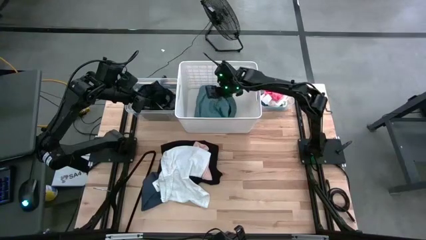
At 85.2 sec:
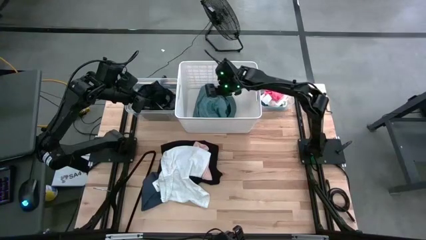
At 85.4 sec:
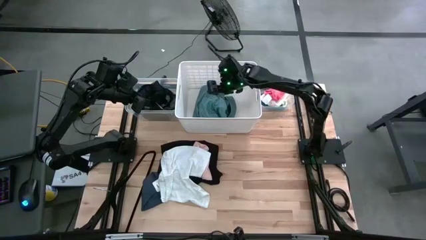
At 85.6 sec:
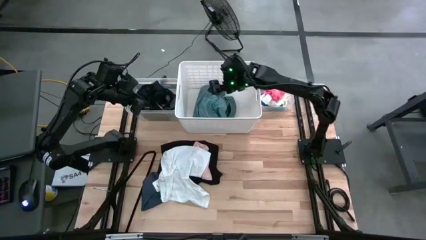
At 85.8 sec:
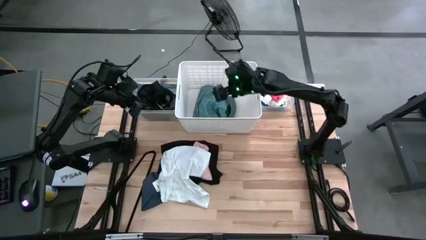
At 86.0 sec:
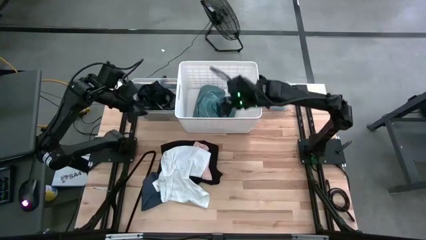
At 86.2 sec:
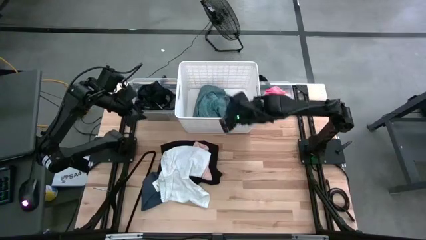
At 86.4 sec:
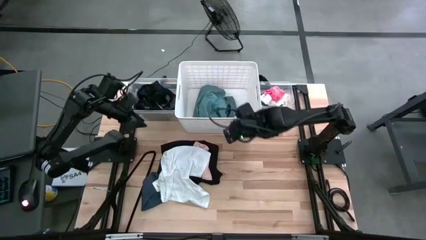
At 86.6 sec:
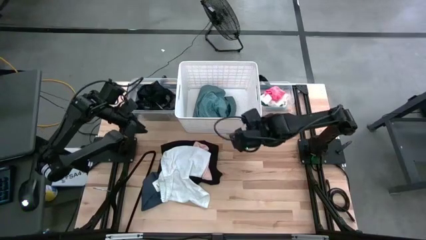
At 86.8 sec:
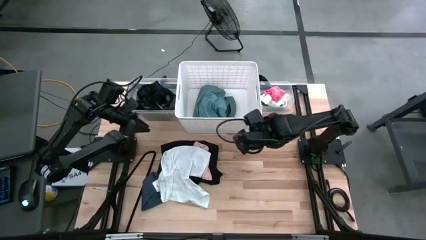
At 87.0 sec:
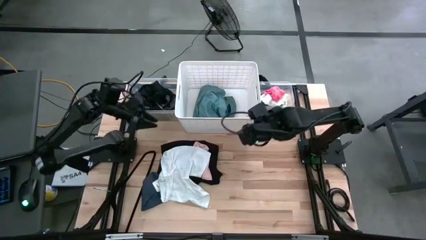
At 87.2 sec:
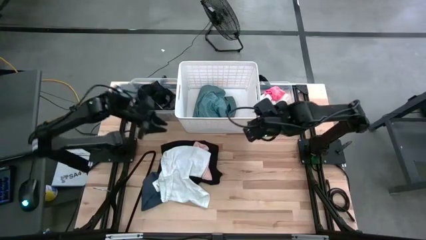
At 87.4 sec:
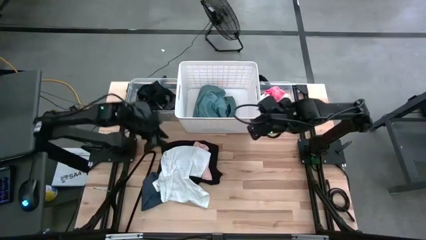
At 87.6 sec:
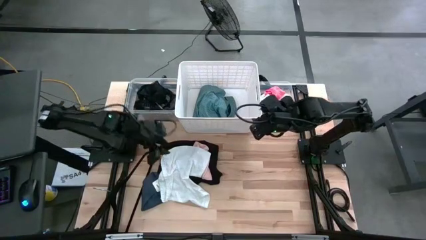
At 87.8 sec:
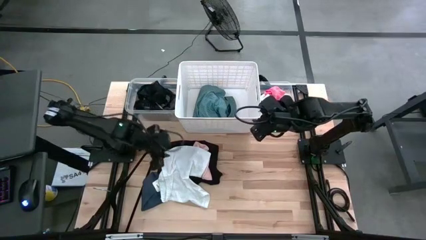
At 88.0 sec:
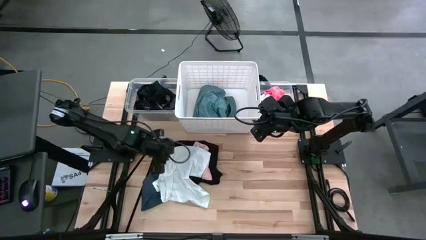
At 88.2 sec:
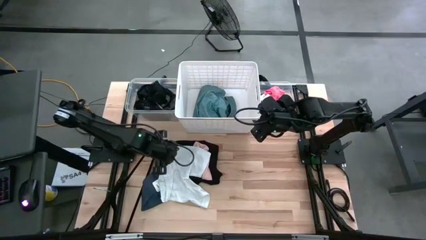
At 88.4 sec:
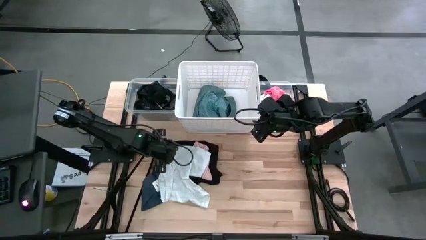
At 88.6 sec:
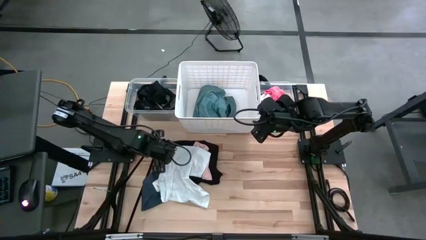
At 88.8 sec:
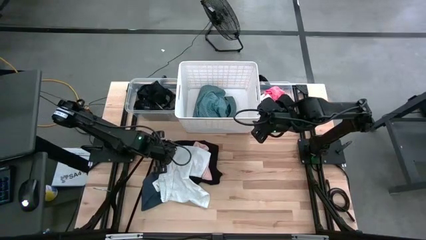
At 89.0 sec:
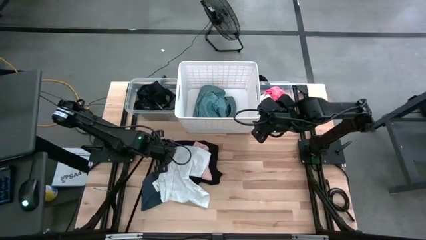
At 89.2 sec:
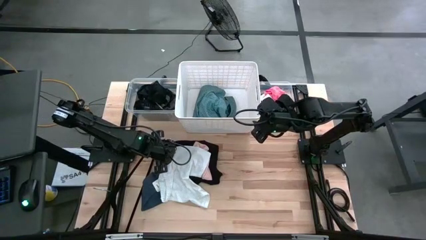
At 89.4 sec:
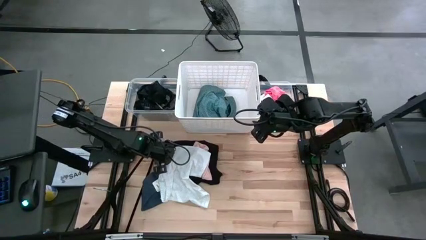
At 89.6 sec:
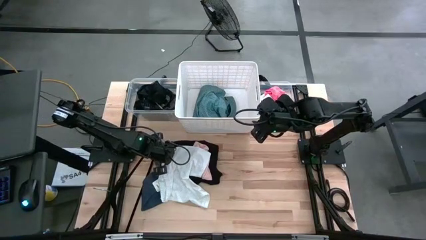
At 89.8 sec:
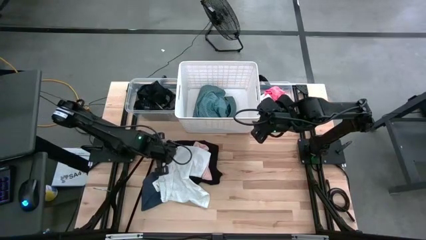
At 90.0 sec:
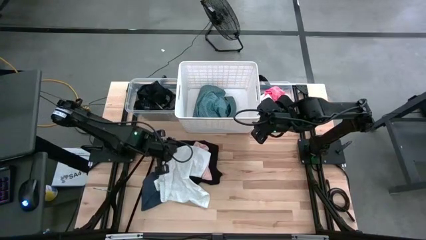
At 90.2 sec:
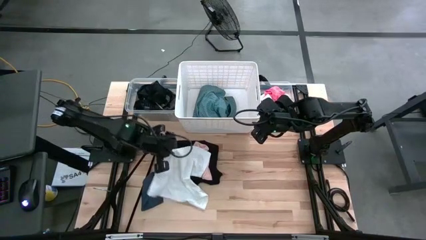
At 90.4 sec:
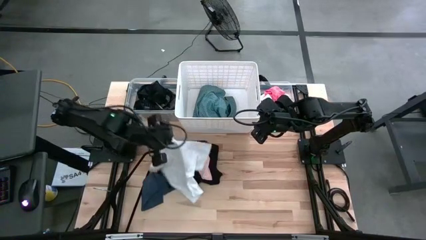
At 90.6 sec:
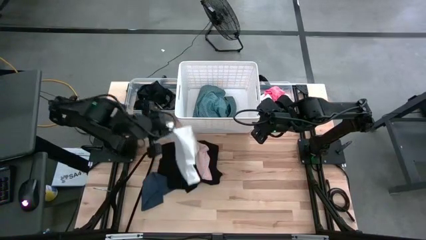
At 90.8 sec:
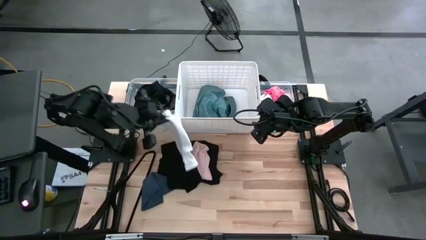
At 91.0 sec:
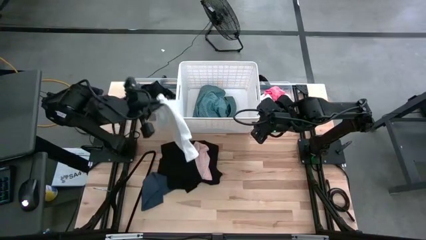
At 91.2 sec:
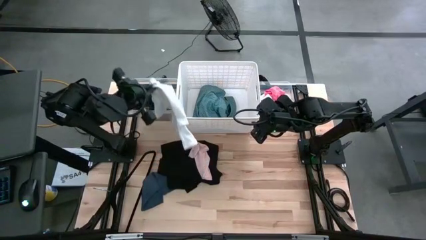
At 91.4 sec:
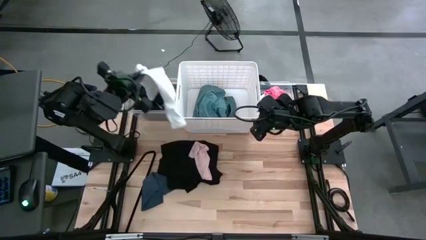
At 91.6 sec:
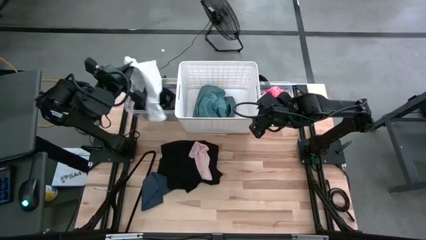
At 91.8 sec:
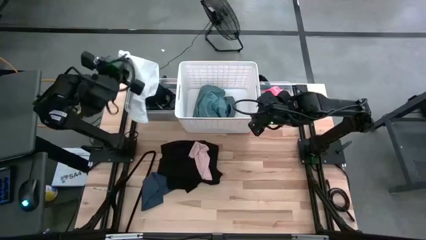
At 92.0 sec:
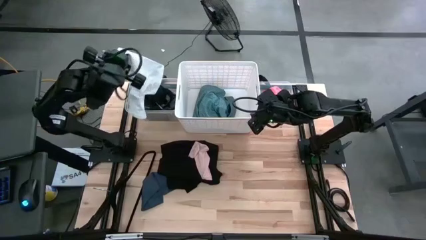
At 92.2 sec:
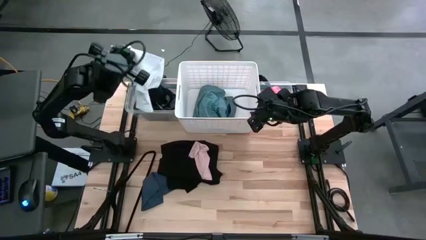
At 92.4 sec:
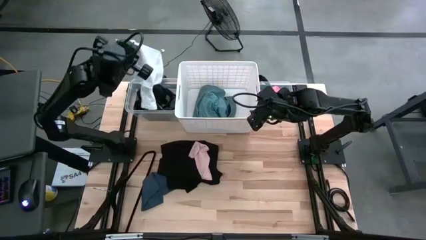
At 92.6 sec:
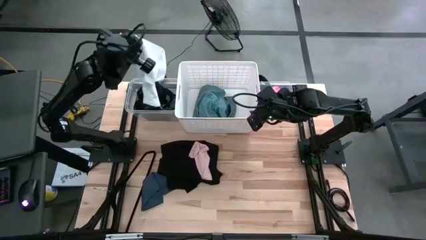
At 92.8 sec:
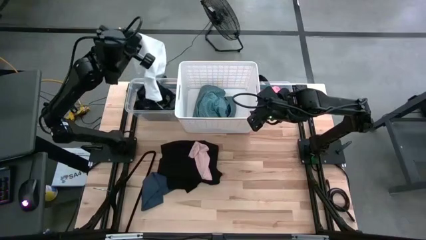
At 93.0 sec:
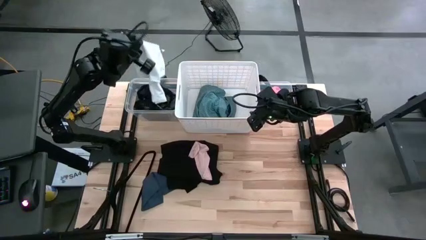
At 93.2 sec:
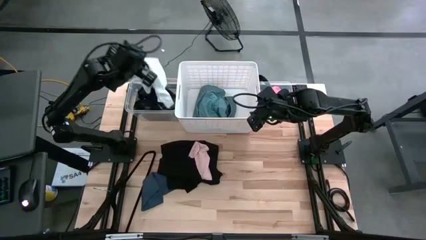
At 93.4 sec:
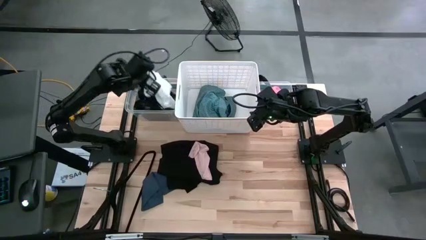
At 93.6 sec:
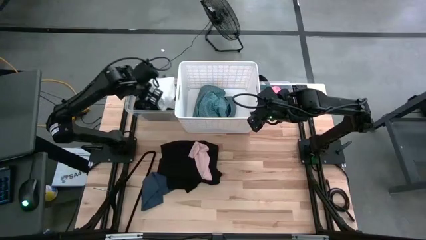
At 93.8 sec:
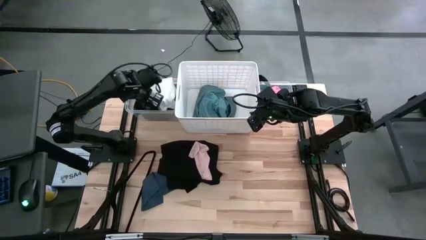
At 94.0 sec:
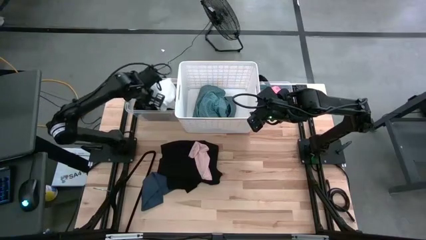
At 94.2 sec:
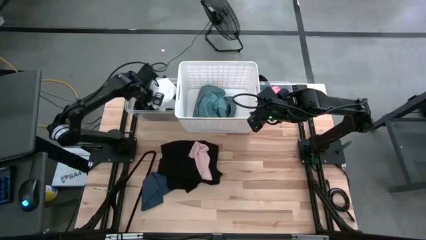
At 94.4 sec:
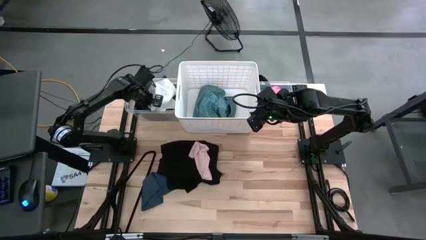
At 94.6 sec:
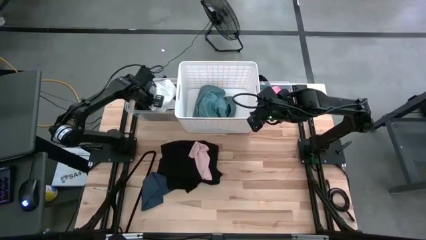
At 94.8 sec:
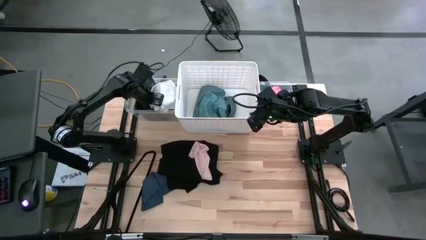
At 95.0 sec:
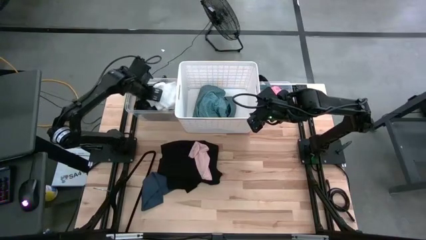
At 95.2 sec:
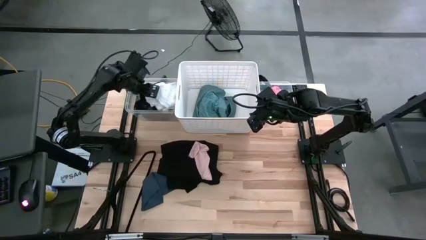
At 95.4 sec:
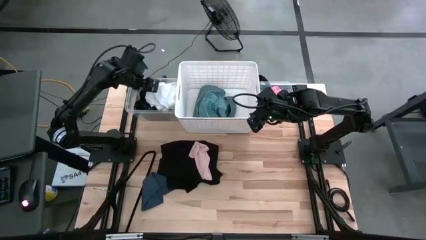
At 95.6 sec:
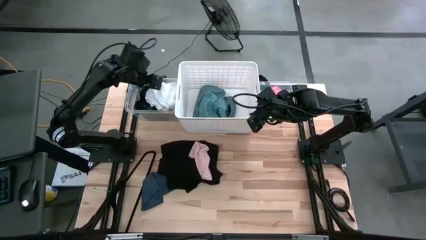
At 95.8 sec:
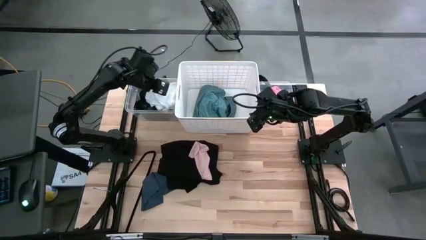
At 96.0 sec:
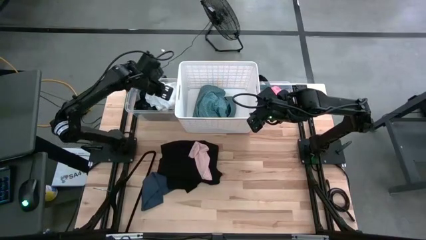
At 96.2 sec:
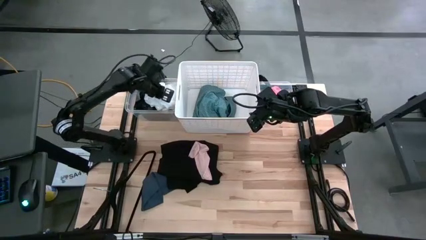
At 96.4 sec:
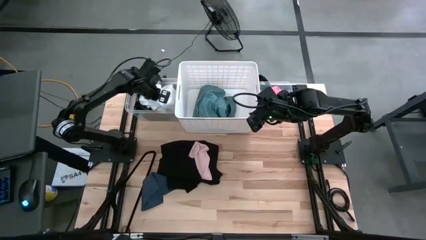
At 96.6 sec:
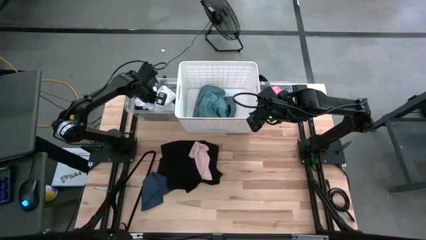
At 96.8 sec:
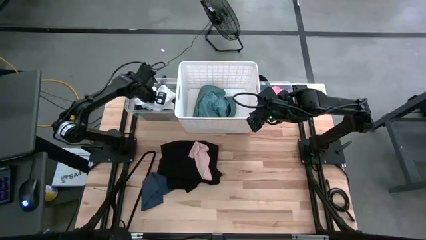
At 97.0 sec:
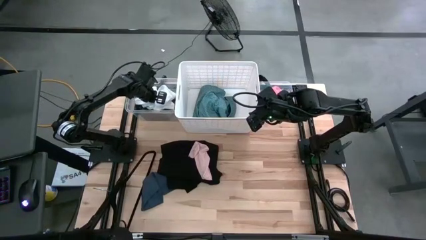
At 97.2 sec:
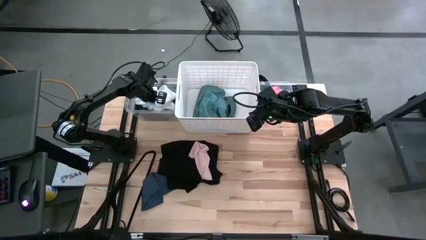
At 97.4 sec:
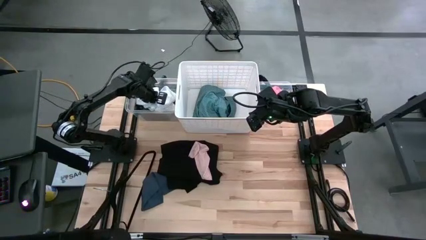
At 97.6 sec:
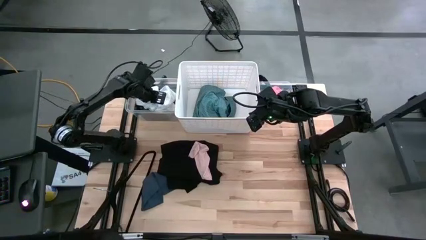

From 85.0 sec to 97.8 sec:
Task: Pick & Place Cloths
Put the white boxers into the left transparent bin

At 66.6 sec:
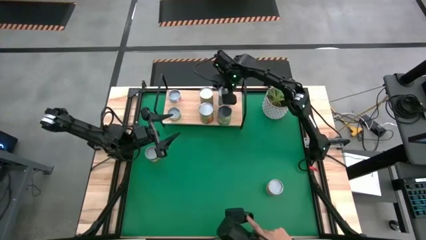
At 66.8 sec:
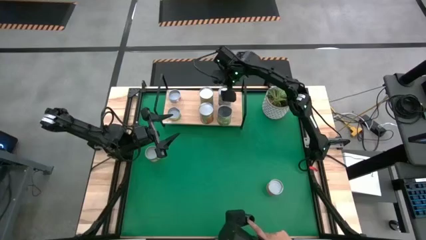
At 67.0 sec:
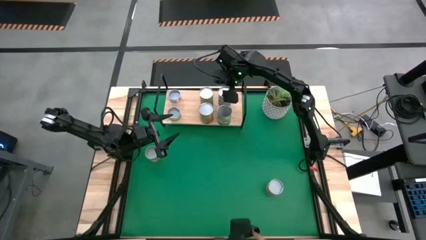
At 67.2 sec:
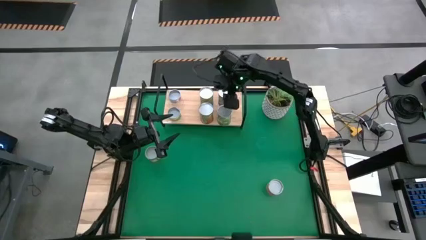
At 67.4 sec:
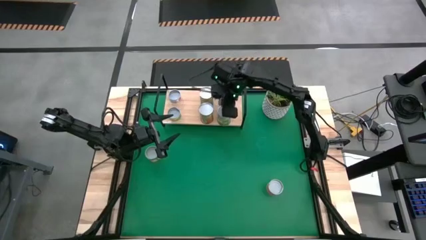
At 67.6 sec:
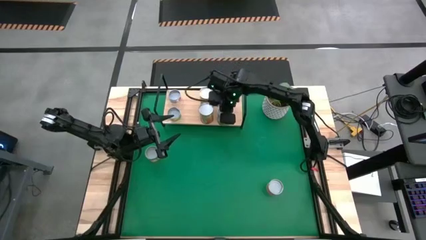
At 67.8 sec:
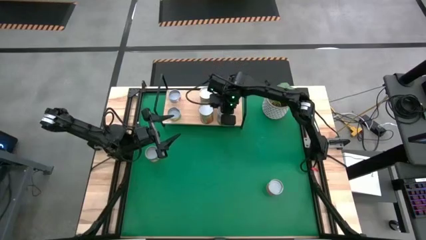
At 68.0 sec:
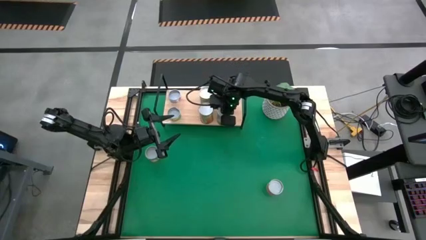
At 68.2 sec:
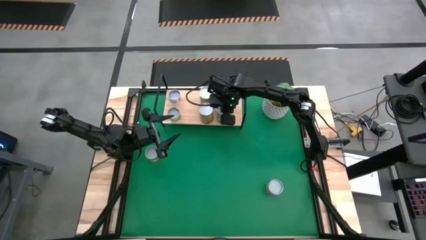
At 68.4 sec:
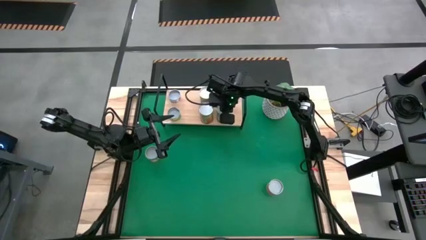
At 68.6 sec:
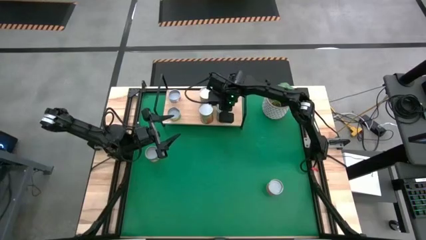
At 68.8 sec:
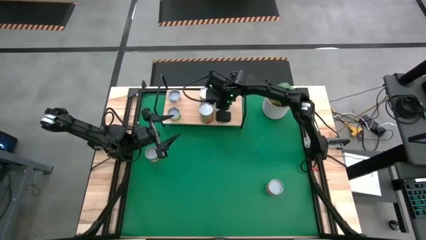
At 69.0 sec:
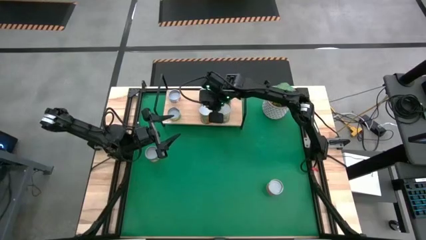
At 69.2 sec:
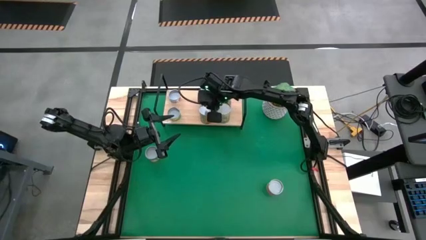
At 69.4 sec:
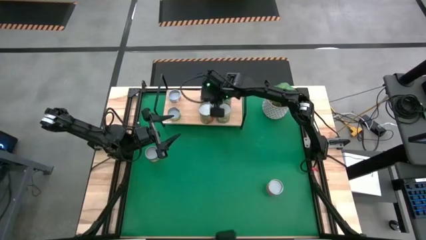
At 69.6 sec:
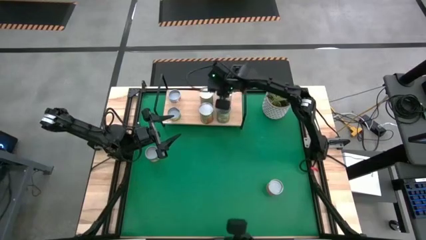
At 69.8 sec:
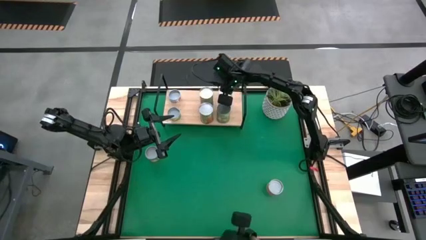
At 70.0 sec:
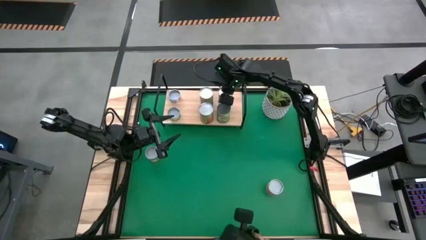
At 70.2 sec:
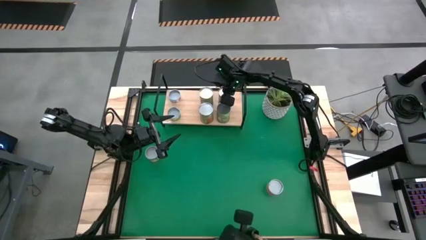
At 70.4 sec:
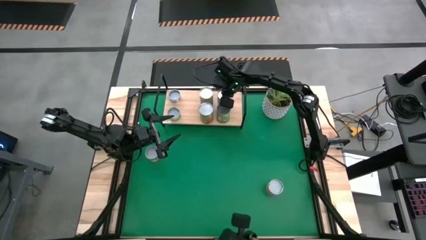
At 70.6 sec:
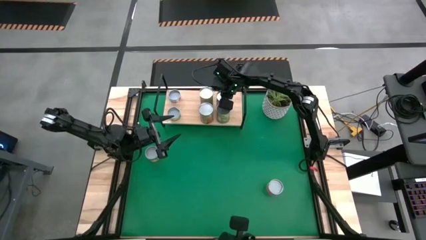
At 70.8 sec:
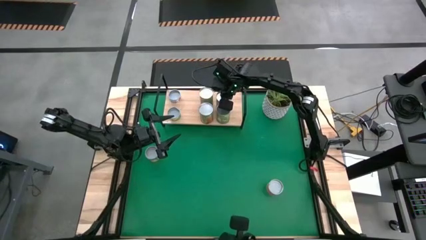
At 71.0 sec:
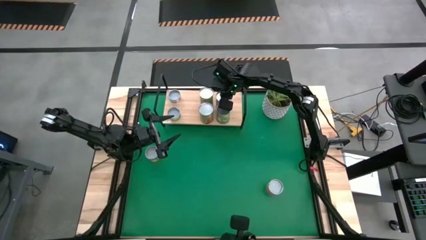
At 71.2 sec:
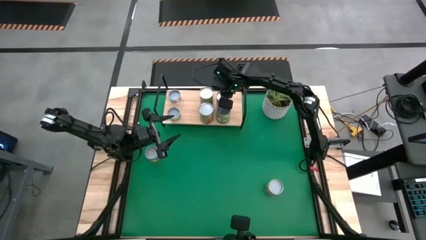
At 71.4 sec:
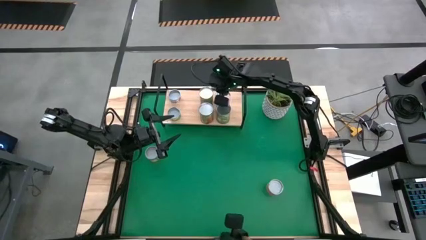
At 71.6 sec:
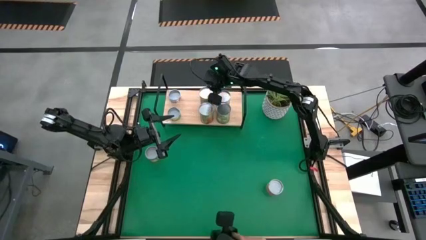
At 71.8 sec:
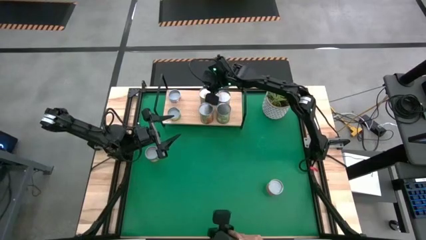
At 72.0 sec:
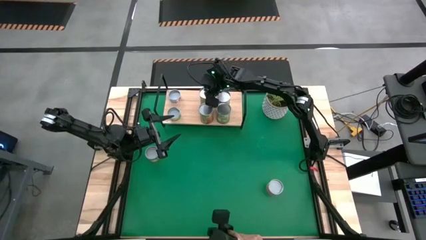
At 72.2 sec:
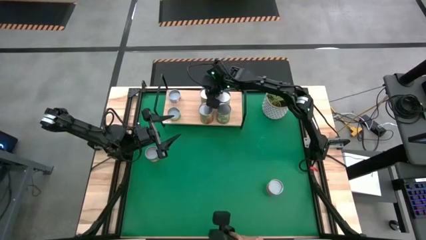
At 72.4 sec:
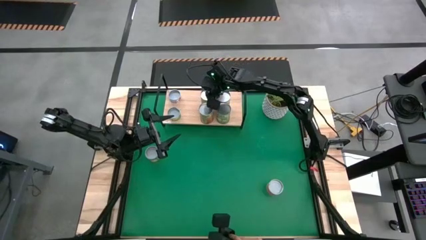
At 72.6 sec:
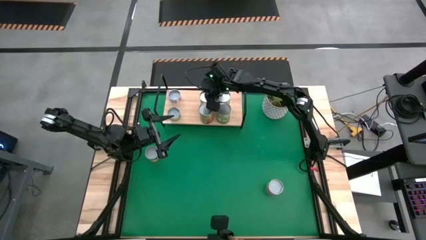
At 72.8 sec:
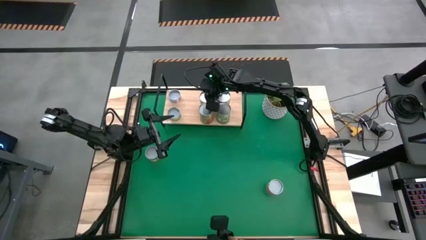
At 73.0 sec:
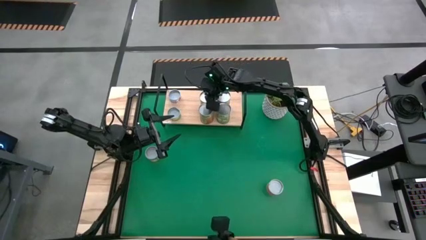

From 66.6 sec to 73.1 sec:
Task: Pick and place cans onto a shelf
Adjust the canned goods on the shelf
